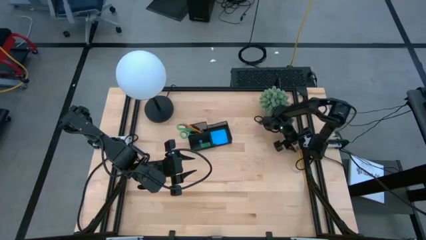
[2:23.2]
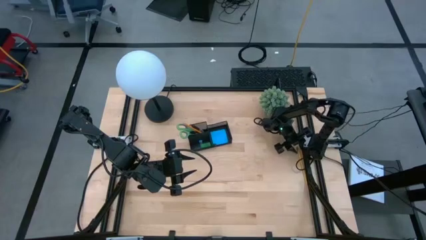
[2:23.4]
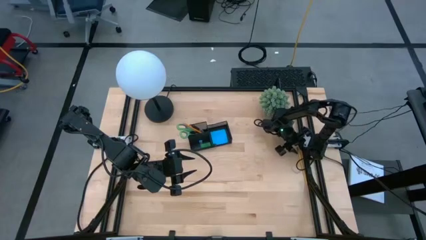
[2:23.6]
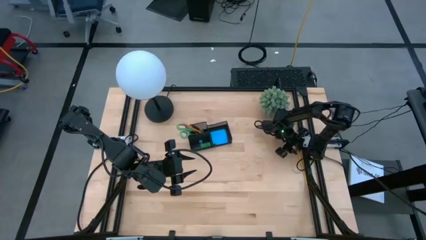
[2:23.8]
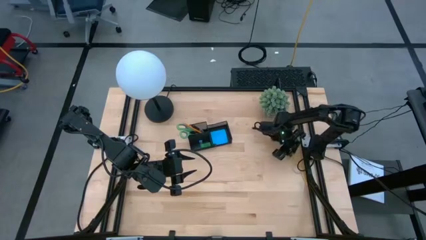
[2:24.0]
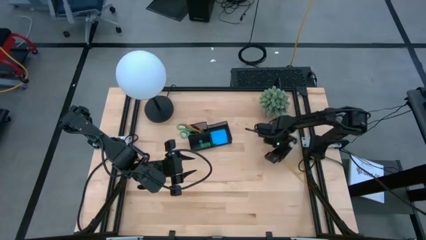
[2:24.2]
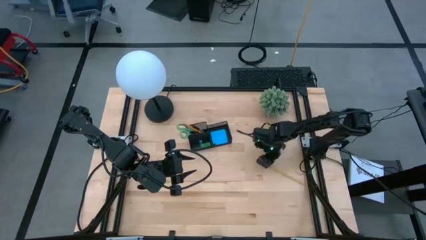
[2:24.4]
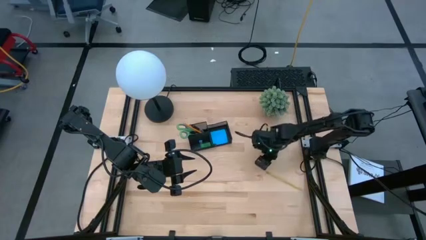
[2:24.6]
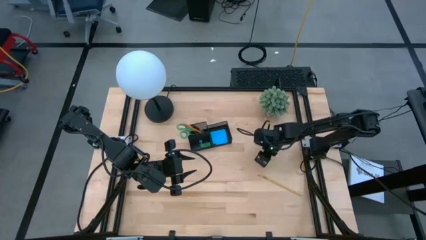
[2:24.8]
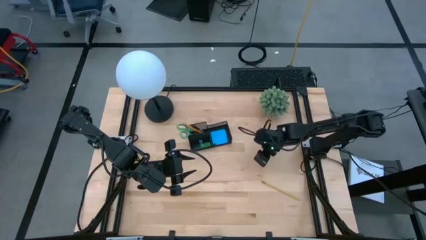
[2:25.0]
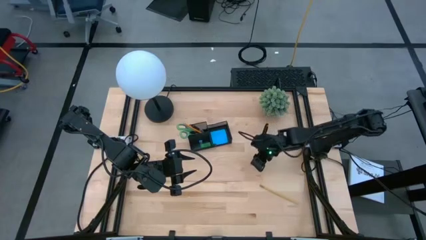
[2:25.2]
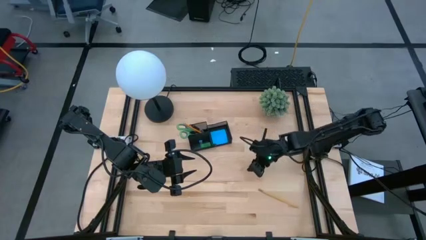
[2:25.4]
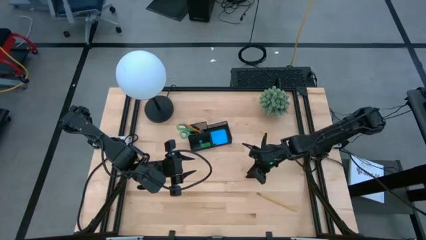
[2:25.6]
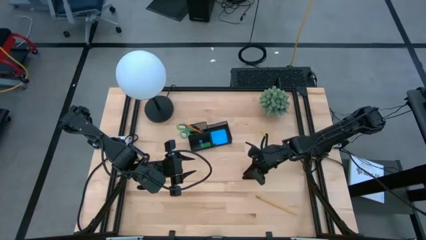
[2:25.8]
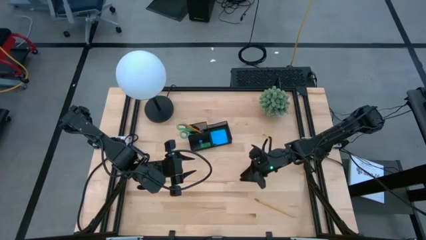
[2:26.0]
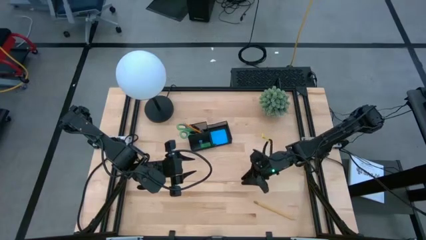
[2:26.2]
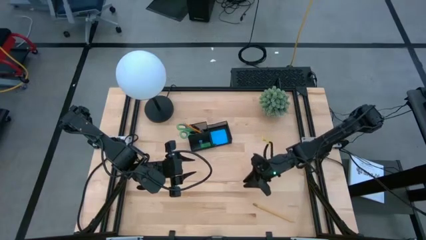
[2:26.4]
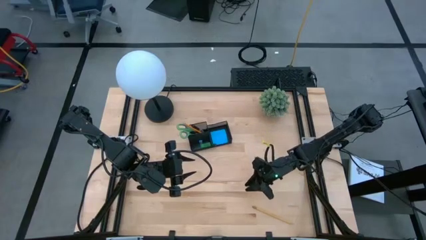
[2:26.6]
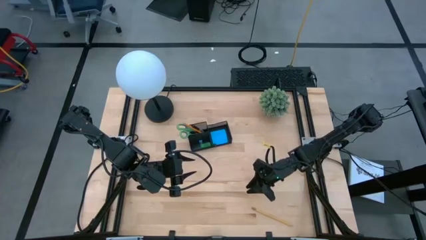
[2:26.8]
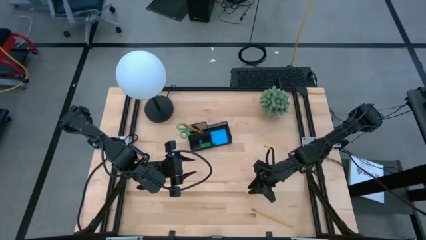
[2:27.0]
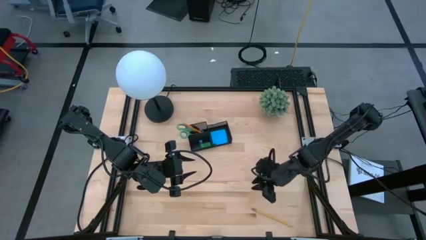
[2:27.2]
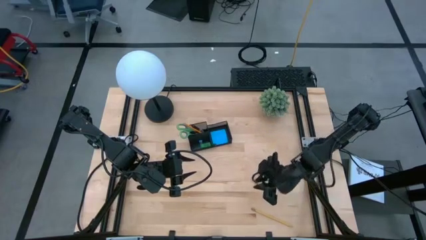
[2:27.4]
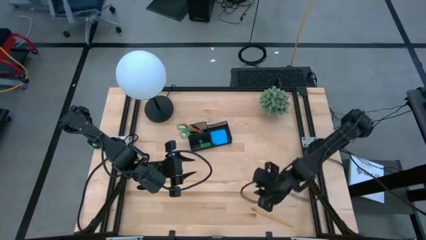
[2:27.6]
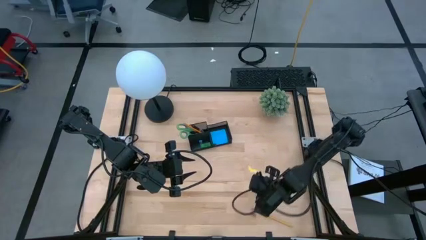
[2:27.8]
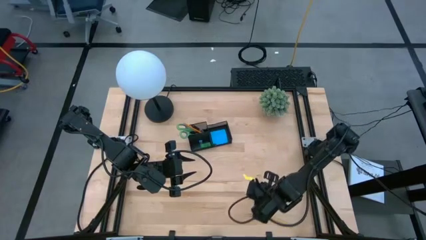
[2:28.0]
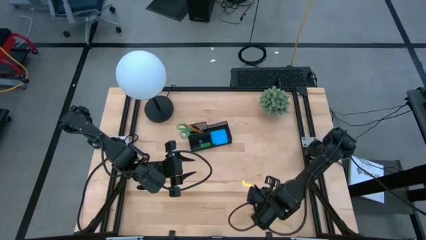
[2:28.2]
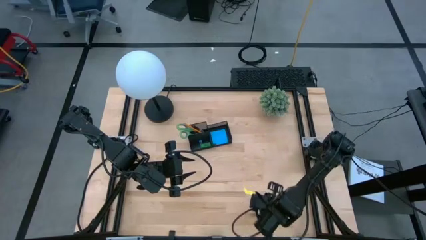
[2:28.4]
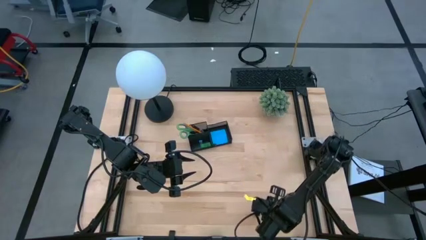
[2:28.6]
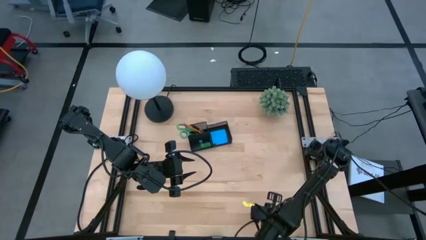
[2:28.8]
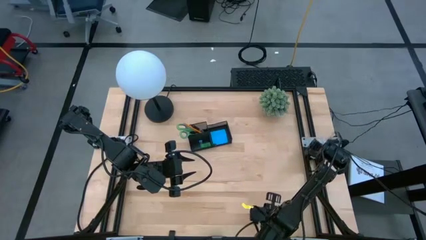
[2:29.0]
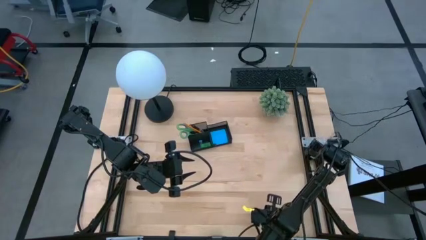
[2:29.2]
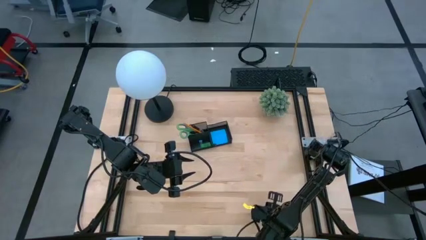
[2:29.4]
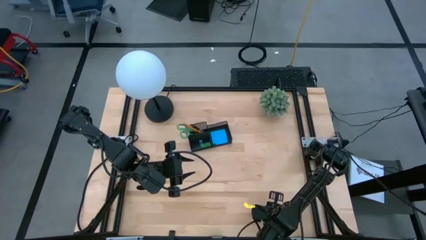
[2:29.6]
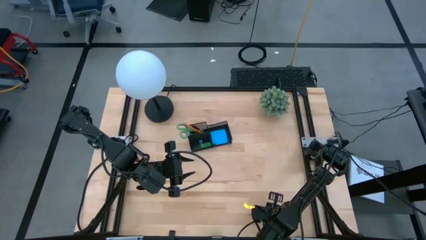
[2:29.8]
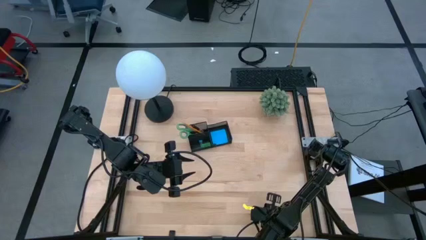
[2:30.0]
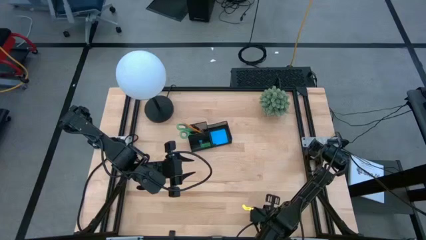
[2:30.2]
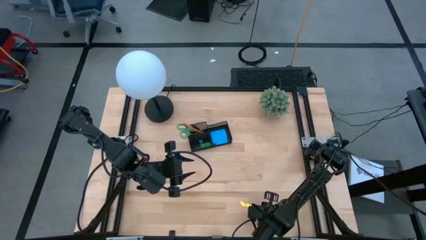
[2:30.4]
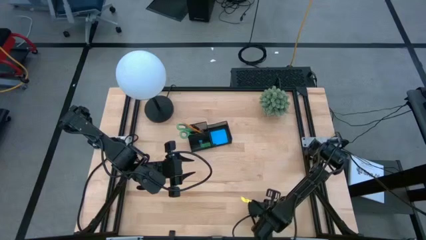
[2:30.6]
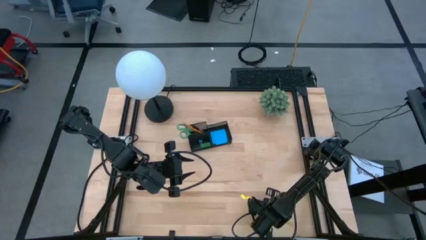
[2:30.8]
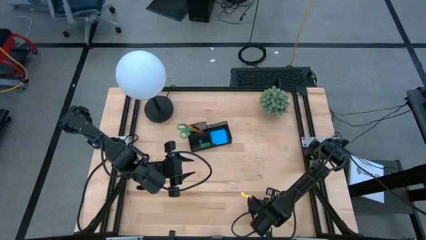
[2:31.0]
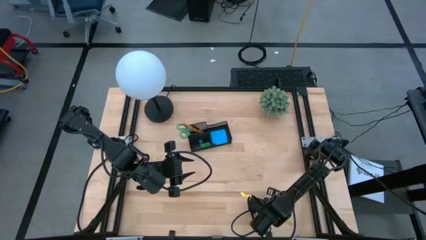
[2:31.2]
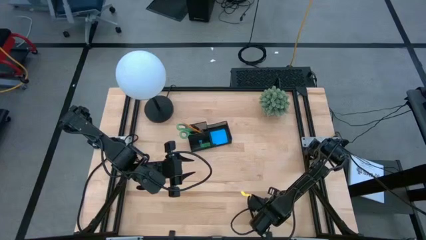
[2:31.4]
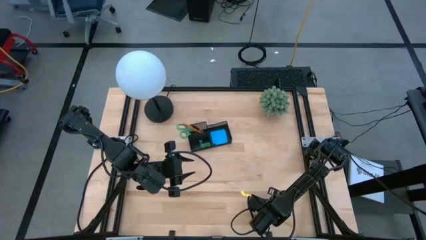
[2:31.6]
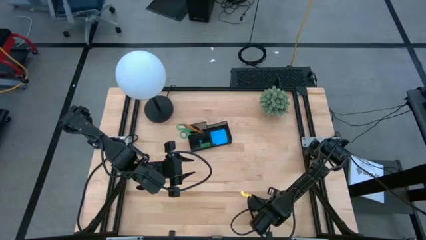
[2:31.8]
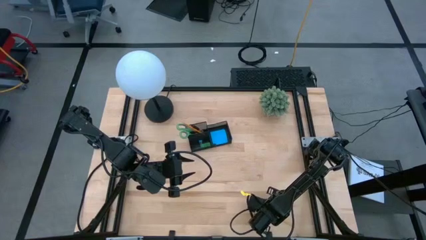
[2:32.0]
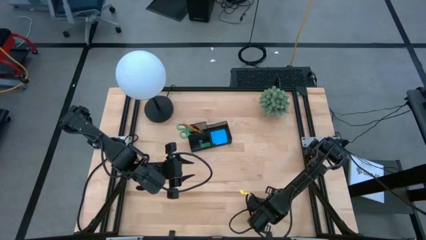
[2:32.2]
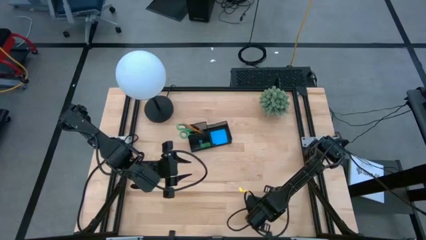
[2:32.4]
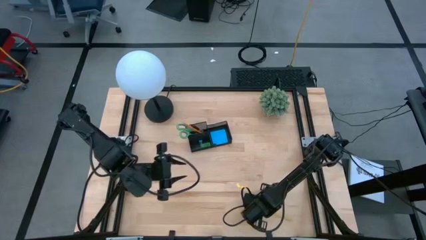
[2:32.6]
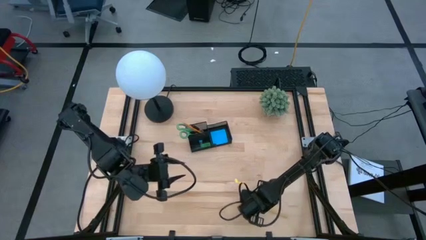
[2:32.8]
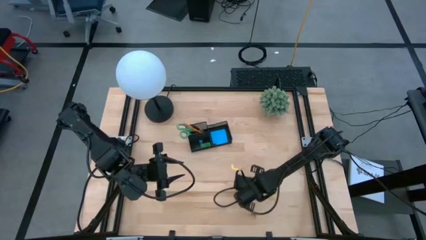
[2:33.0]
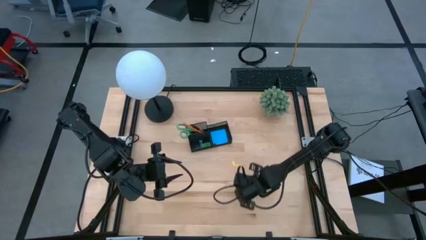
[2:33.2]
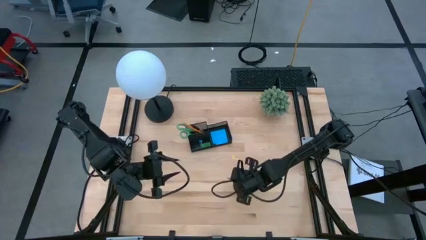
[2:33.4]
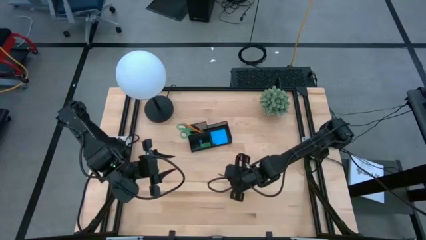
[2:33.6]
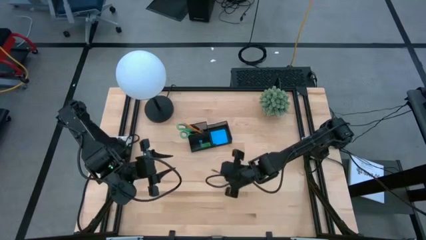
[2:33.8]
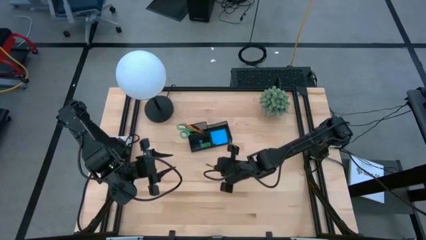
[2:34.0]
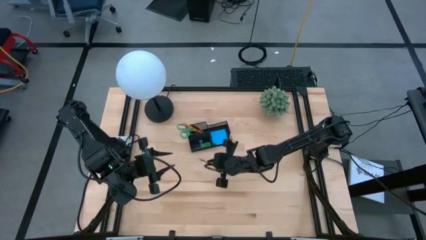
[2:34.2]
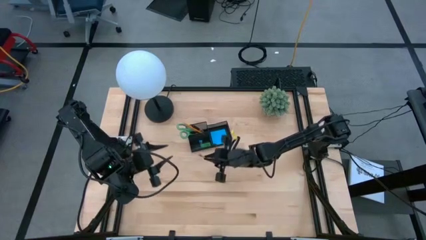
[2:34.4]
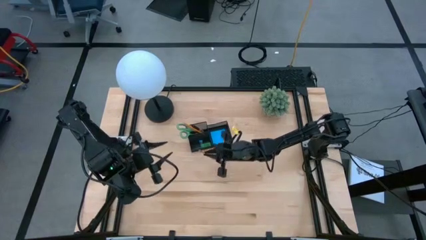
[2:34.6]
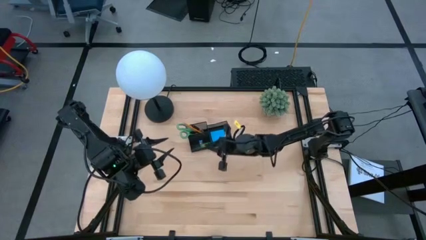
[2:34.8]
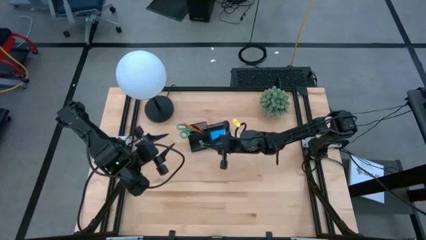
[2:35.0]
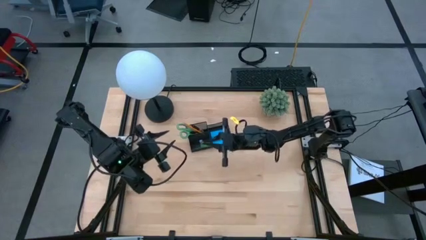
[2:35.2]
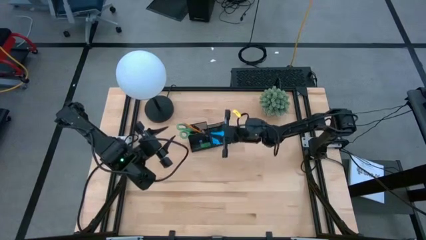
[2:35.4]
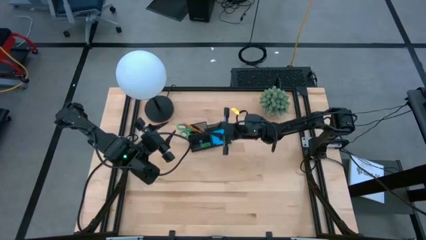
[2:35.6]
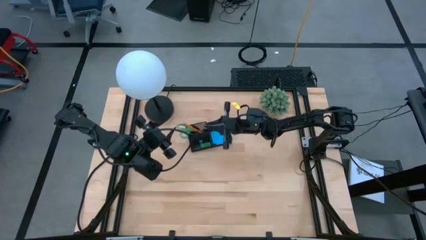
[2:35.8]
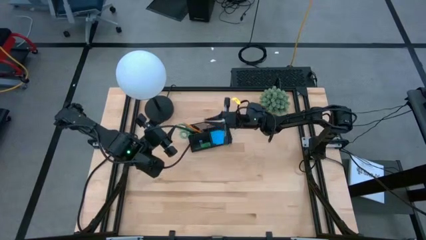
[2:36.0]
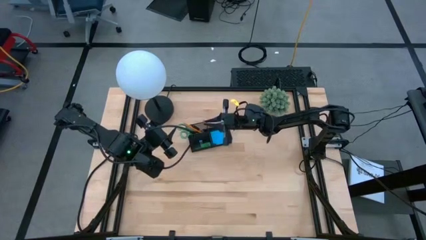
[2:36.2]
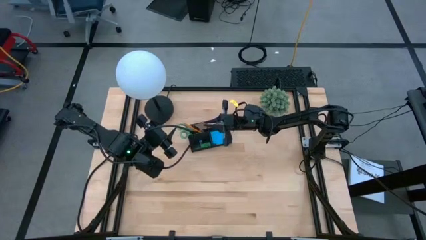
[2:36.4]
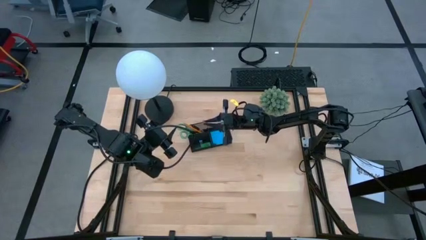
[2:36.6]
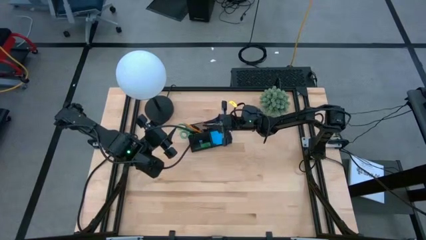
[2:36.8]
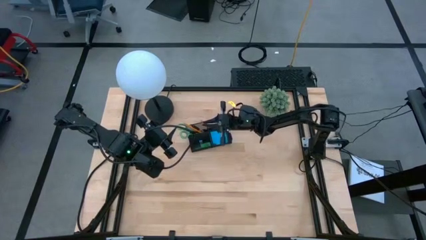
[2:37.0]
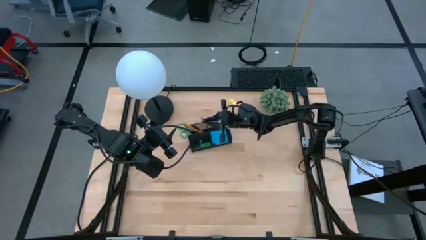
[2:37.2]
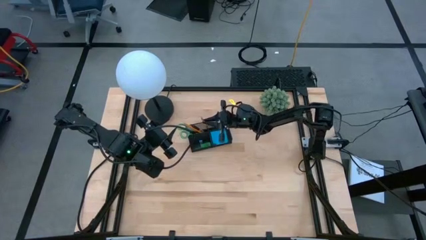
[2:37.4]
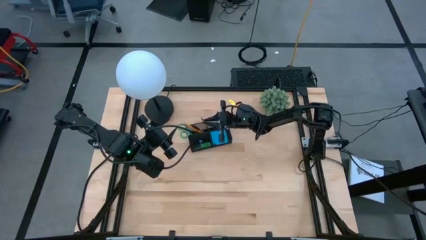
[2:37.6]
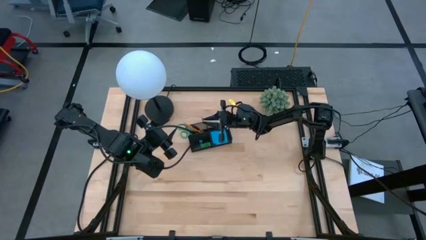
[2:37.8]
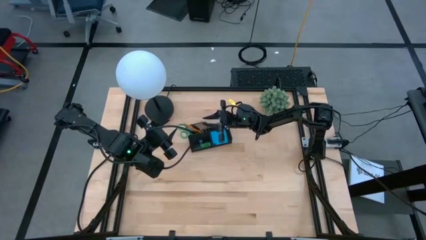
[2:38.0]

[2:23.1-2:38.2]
Task: Pick and place office supplies into organizer
Put the yellow pencil into the black desk organizer

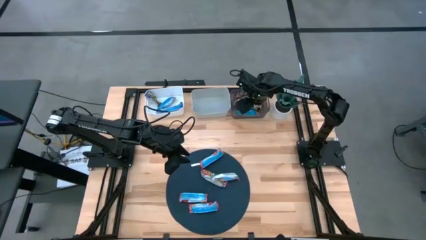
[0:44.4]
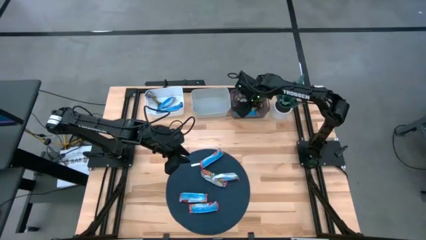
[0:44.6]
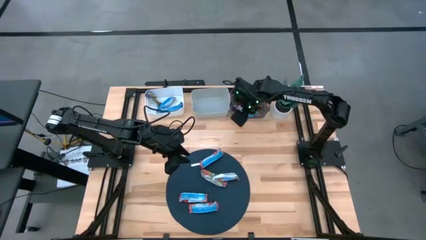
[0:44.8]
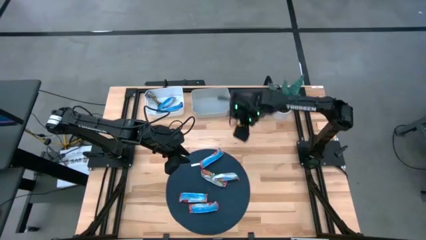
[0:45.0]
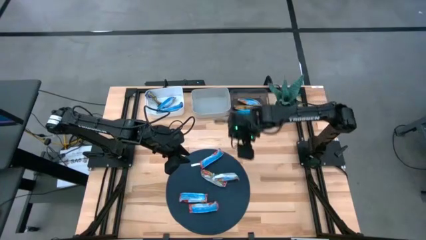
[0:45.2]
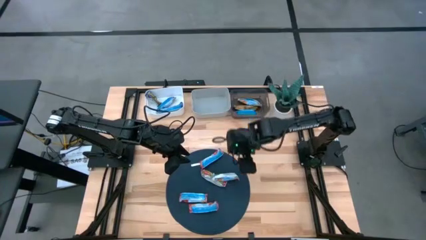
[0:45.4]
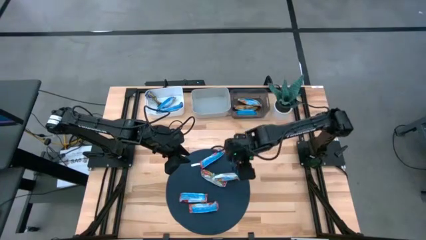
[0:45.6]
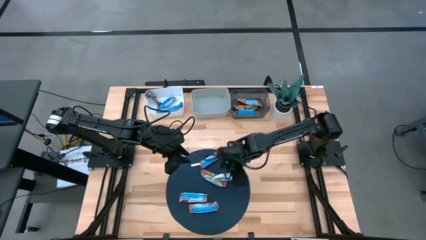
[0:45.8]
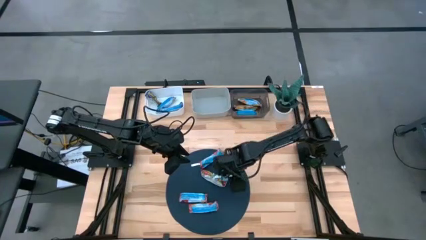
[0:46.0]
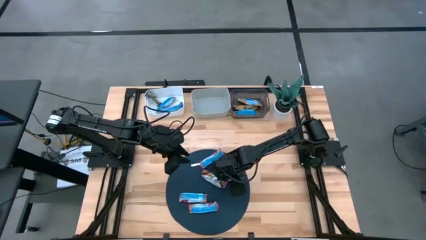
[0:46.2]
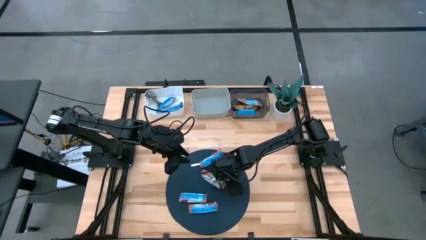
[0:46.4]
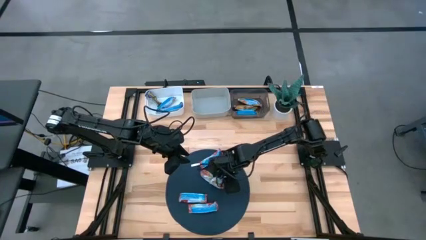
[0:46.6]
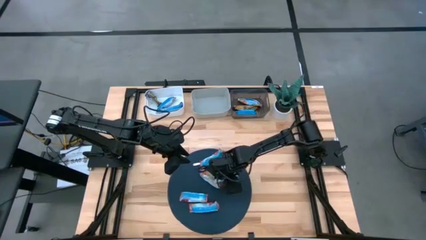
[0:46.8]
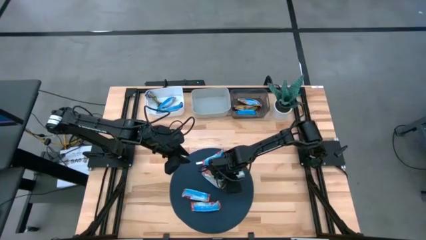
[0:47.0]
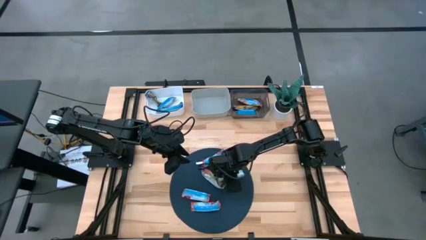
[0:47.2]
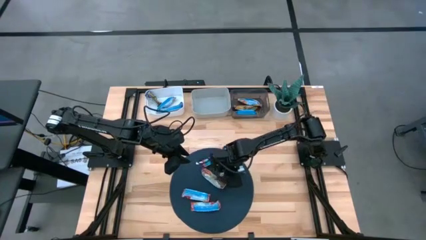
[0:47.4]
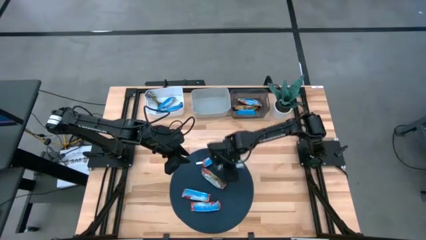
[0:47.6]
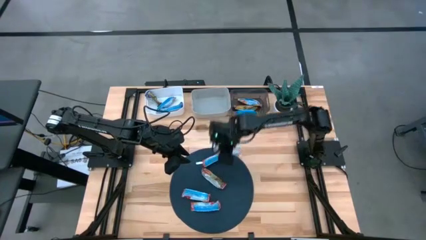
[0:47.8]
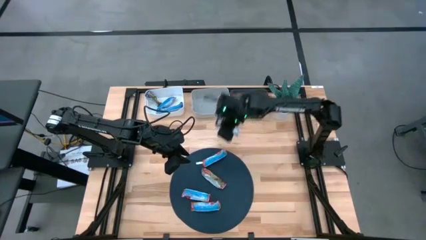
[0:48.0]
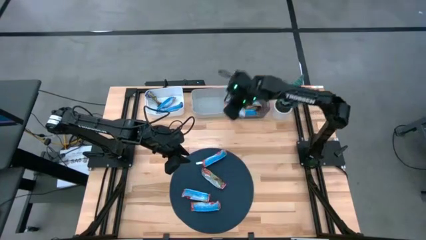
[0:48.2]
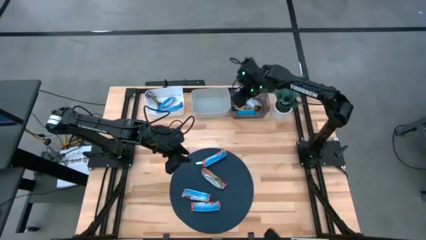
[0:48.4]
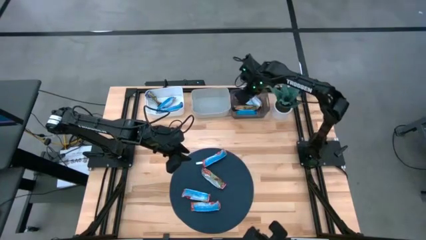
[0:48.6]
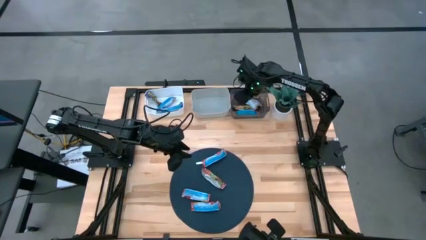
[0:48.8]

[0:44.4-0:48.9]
Task: Pick and place Granola Bars by type
Put the yellow granola bar into the black bin
